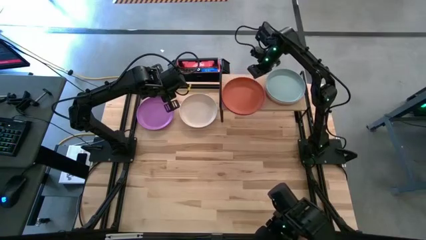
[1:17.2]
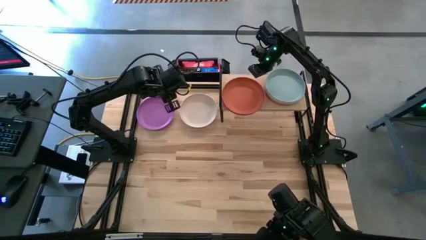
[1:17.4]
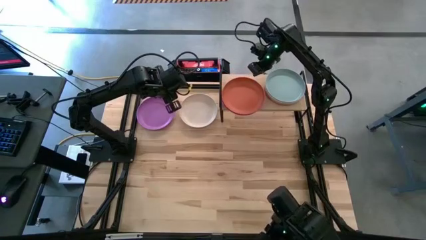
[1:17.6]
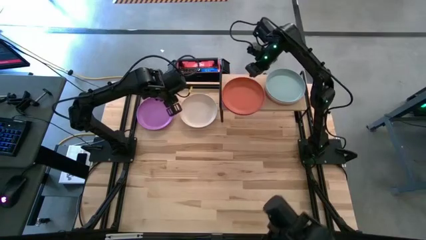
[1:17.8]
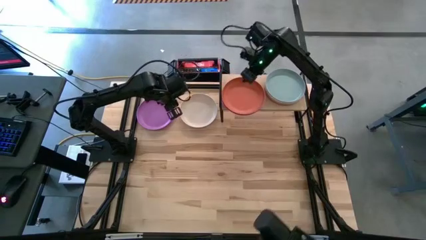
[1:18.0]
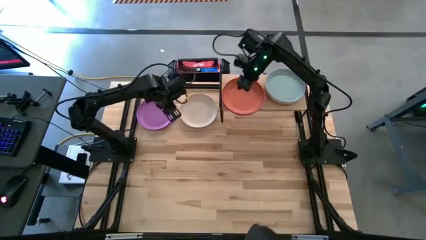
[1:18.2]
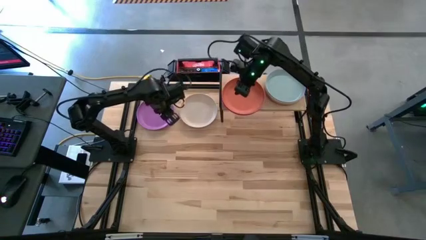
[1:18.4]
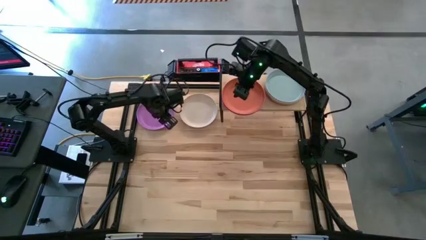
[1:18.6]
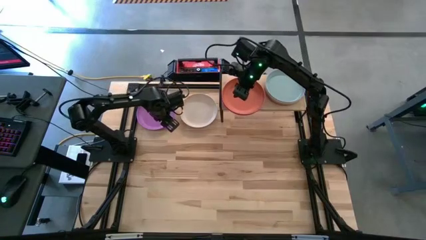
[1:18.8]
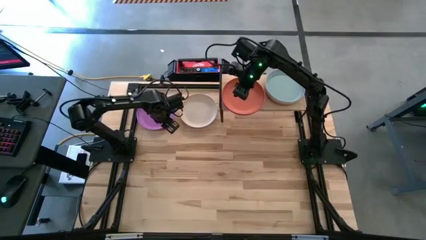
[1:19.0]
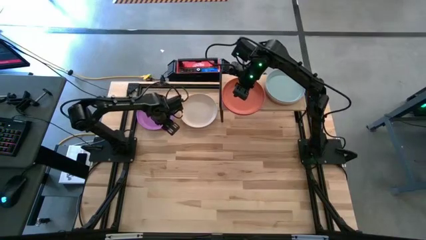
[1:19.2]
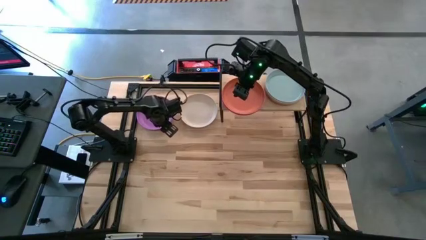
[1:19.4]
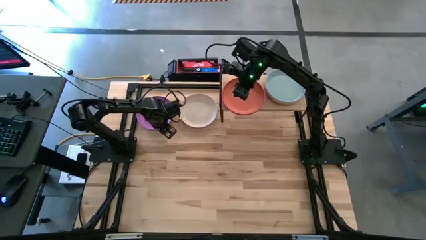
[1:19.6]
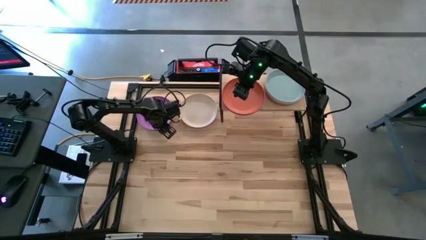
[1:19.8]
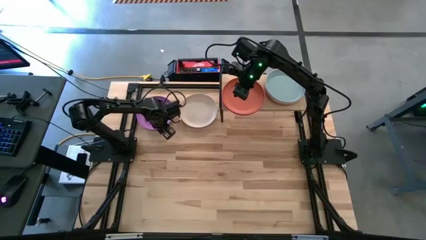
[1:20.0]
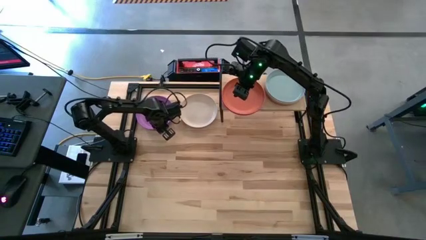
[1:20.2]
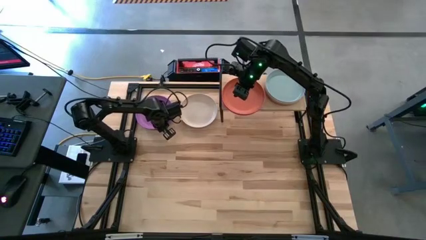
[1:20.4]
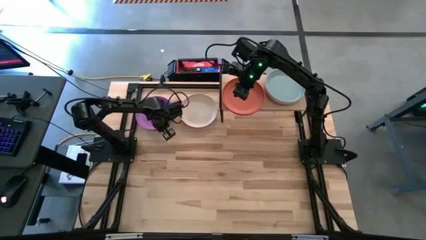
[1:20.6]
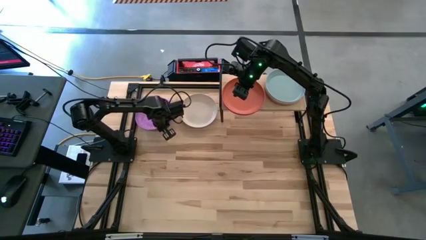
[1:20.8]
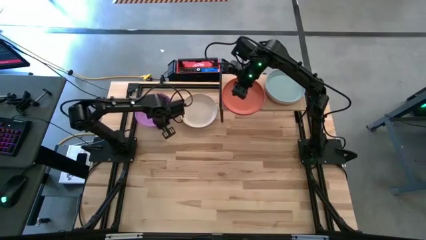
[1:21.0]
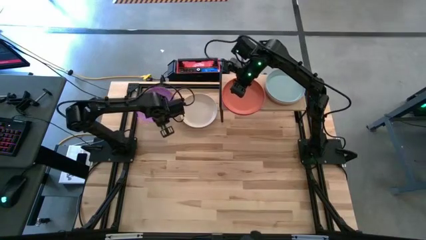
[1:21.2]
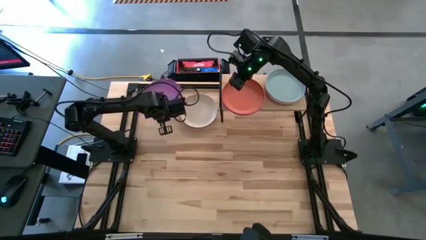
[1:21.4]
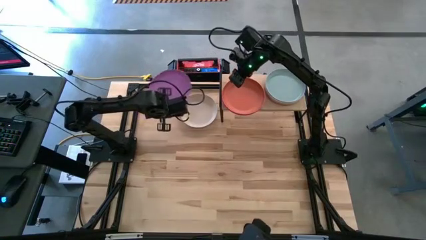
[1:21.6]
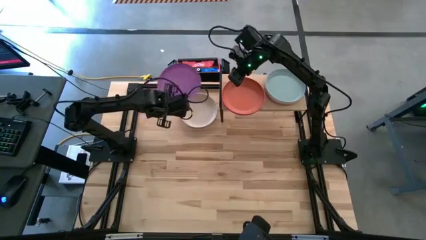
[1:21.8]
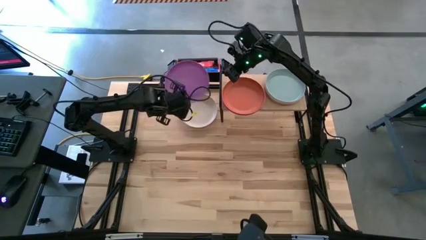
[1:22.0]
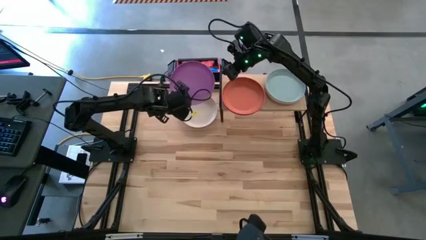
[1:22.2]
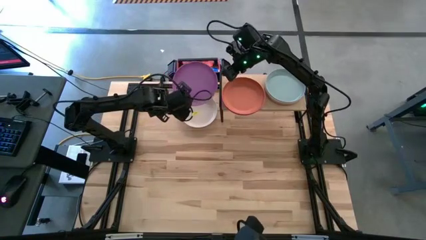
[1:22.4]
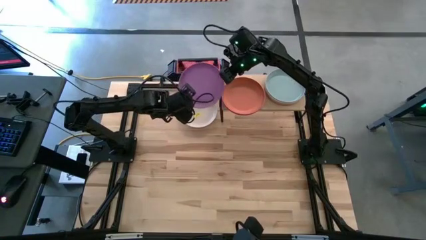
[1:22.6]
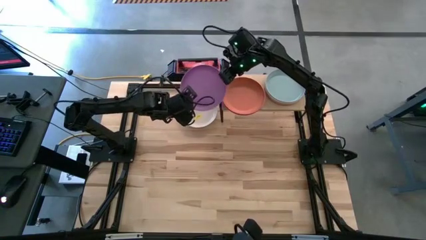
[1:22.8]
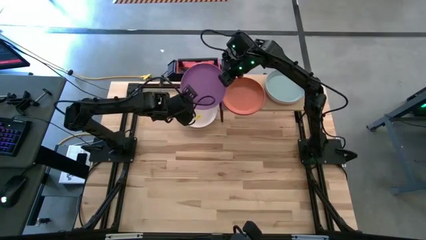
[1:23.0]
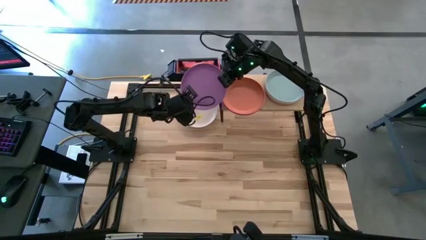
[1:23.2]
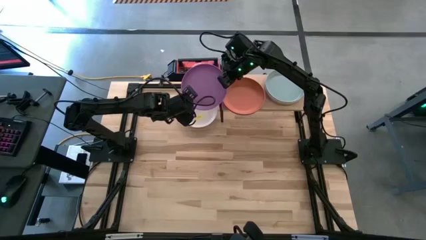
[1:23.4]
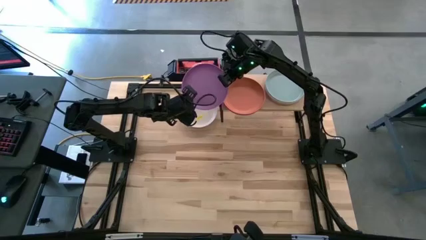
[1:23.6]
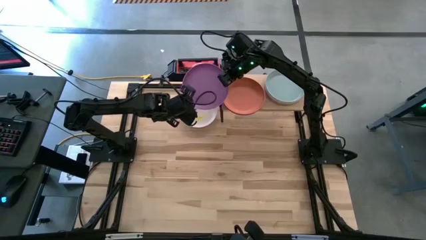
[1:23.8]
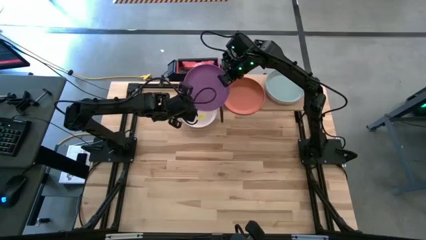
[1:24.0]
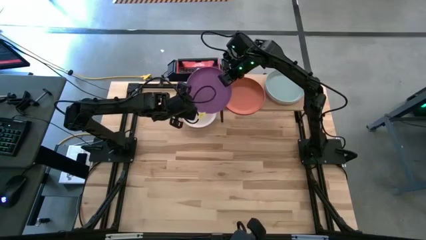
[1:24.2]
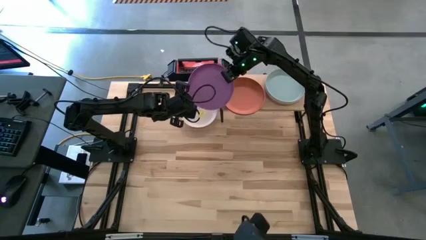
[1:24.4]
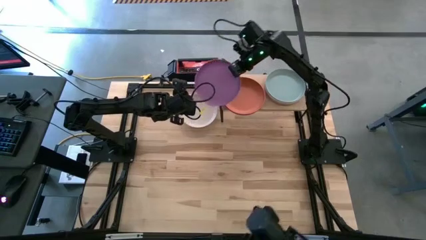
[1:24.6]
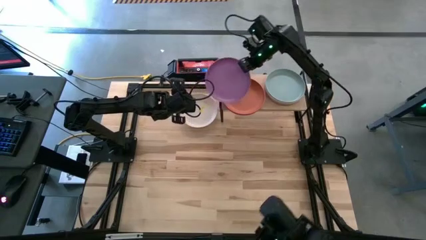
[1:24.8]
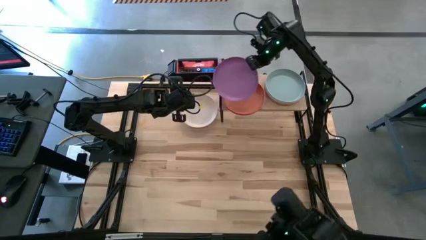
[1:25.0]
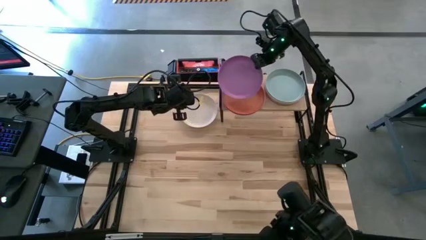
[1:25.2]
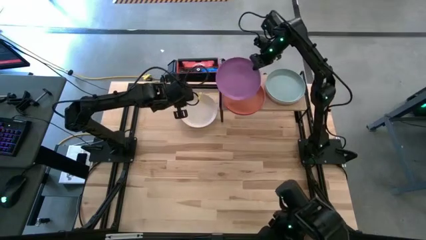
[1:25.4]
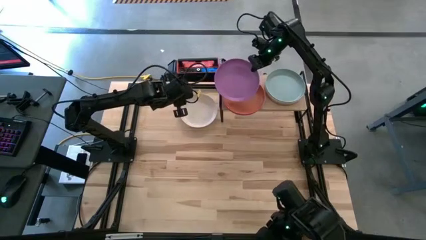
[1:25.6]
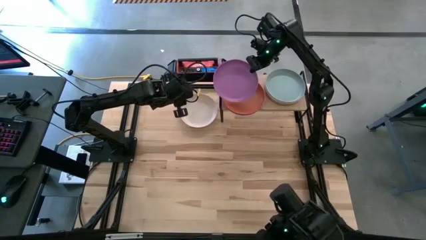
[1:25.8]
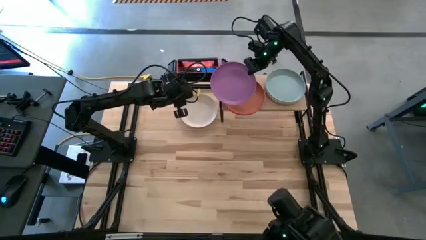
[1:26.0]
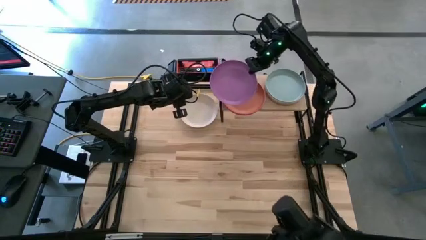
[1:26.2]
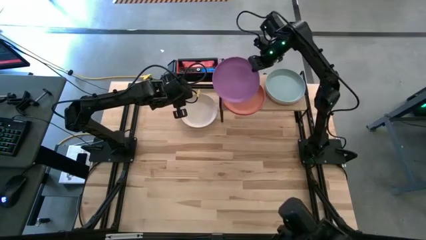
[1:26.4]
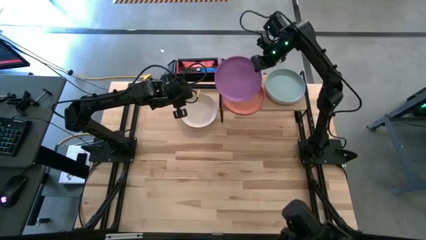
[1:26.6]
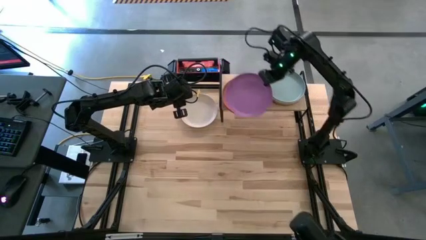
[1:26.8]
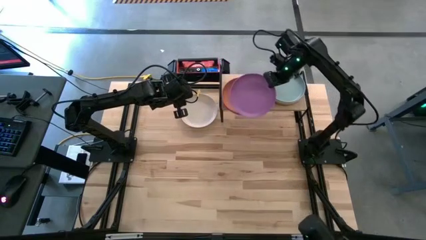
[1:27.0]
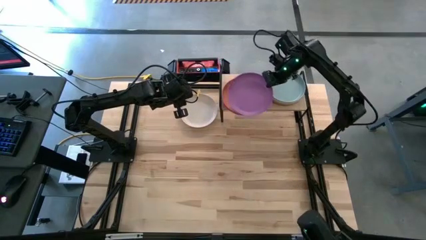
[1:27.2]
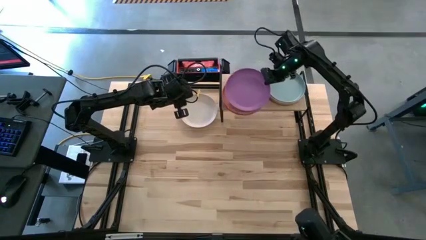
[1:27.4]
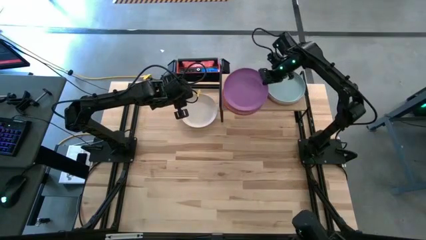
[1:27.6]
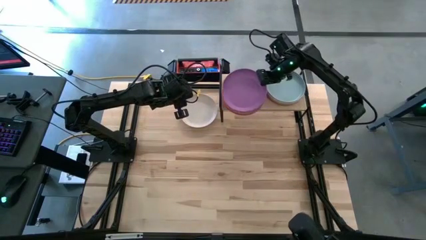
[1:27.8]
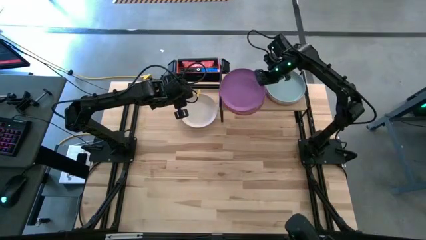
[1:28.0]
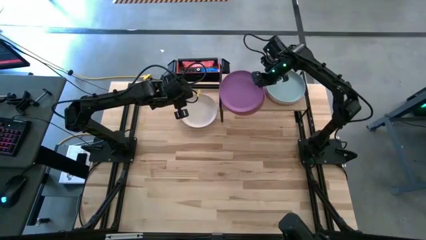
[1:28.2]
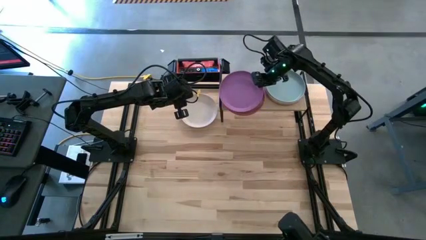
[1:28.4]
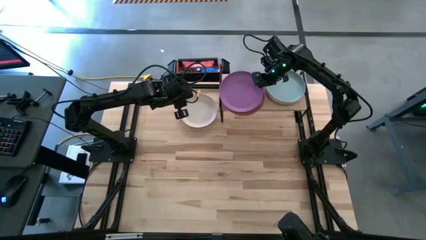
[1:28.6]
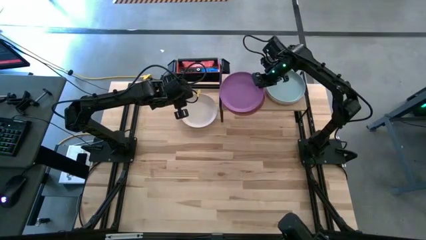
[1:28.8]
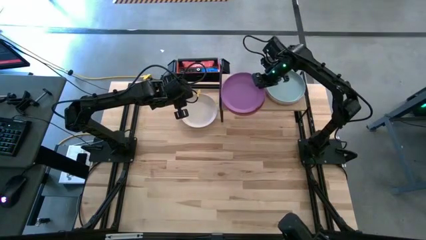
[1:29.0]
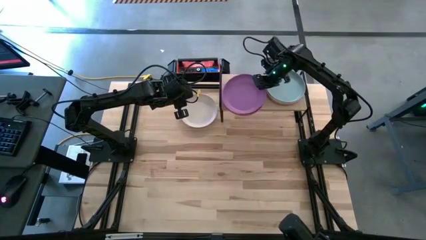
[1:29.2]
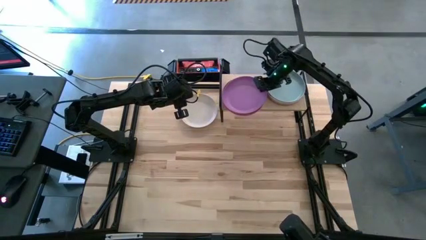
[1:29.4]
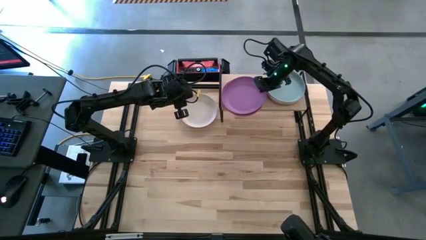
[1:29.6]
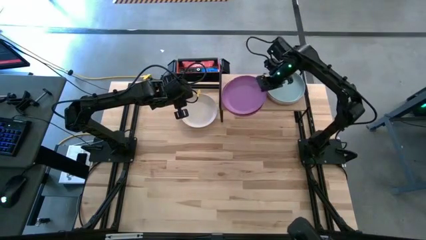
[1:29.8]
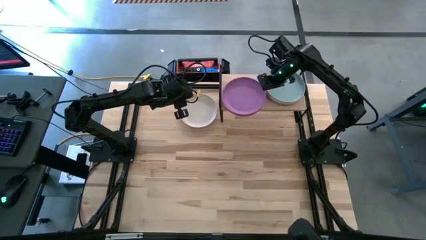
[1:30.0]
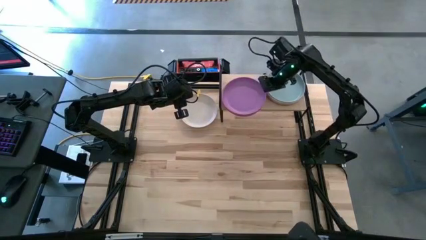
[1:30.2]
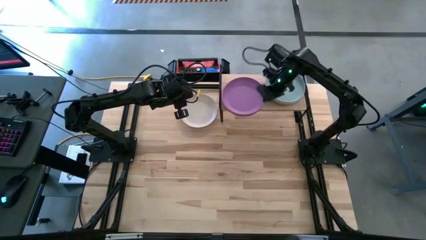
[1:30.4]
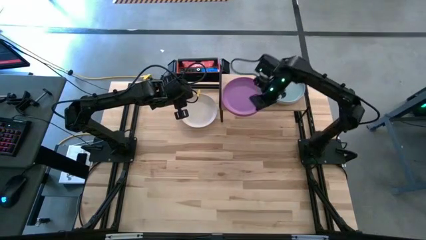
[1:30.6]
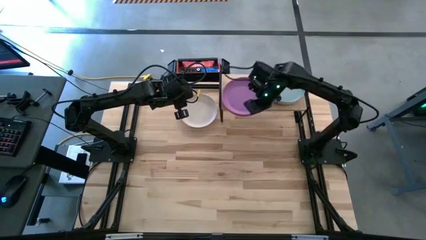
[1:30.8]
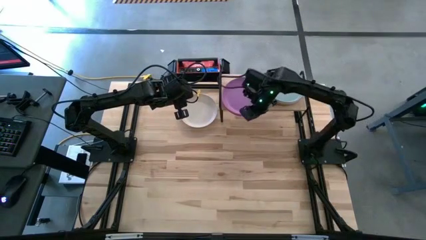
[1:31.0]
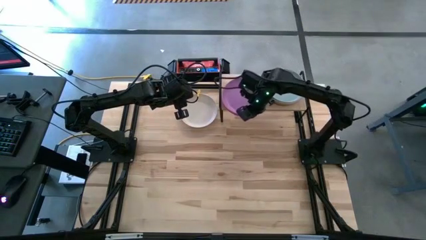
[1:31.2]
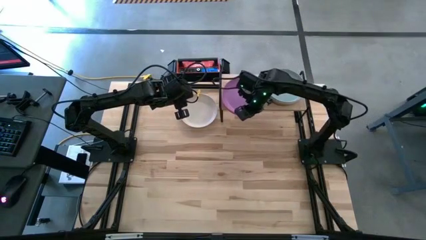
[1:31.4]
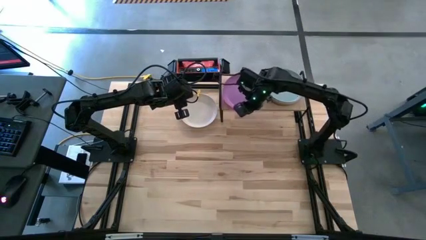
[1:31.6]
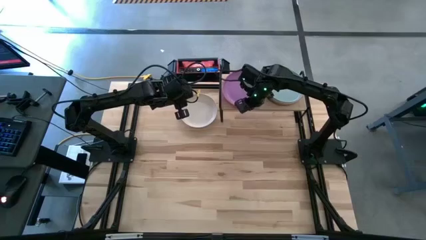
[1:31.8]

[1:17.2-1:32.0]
Task: Place and stack plates onto a shelf
Stack the purple plate on top of the orange plate on the shelf
